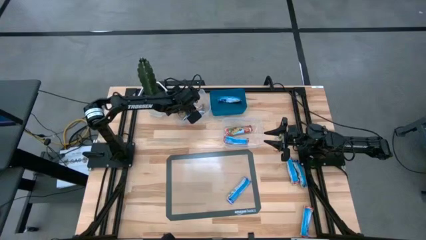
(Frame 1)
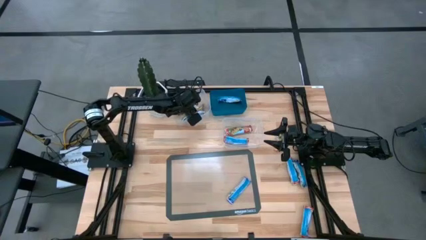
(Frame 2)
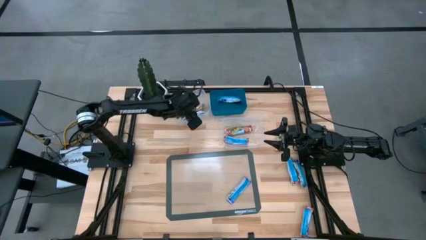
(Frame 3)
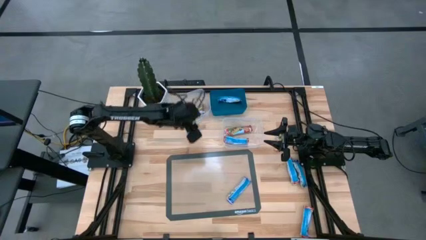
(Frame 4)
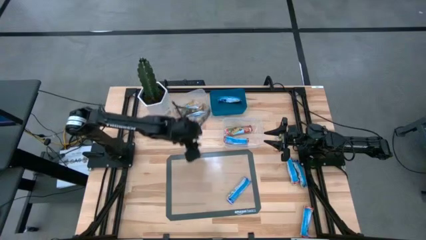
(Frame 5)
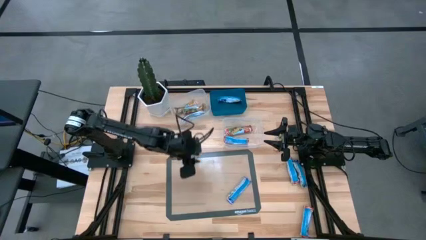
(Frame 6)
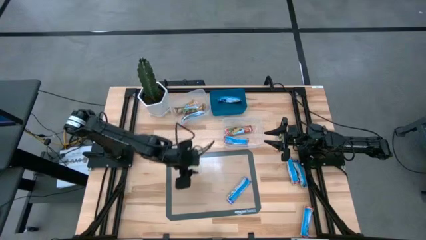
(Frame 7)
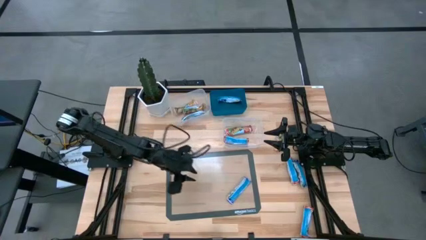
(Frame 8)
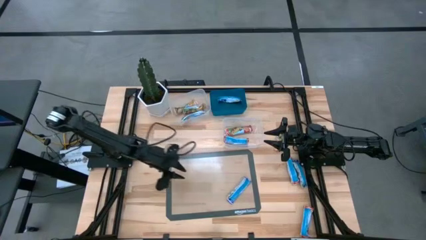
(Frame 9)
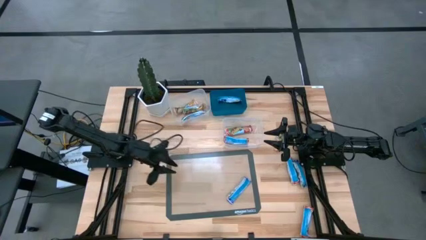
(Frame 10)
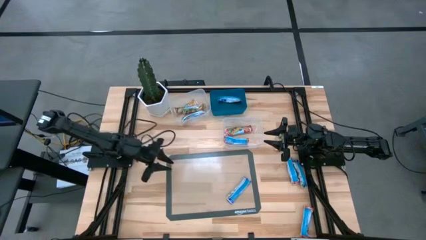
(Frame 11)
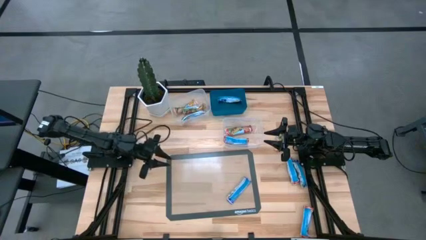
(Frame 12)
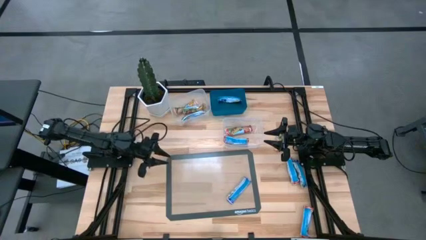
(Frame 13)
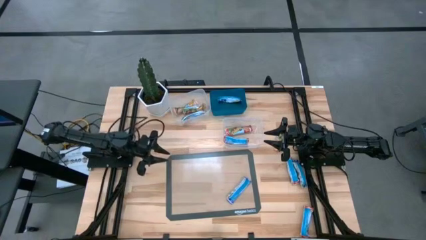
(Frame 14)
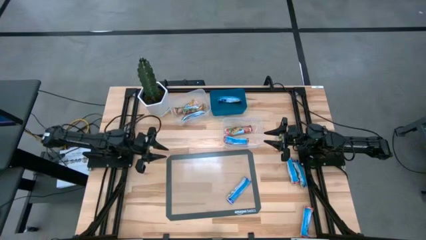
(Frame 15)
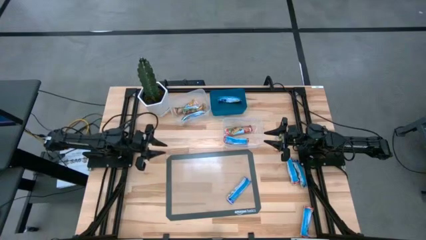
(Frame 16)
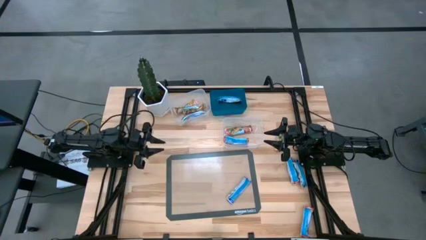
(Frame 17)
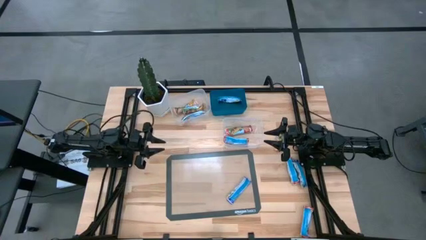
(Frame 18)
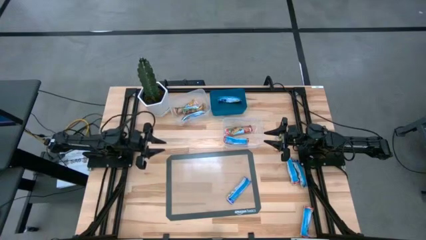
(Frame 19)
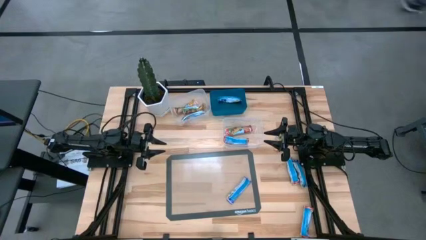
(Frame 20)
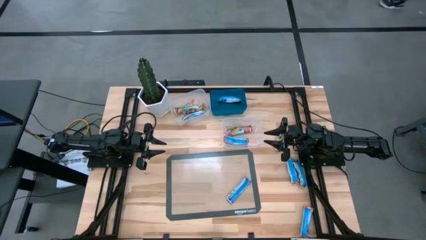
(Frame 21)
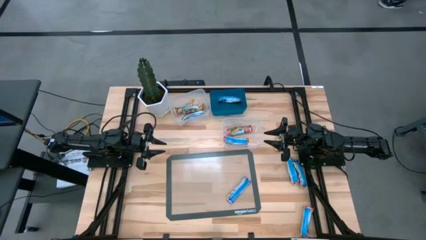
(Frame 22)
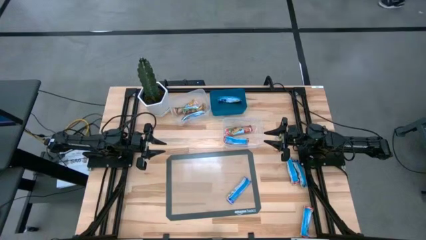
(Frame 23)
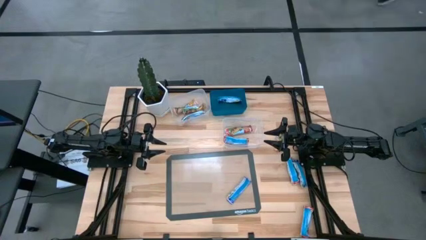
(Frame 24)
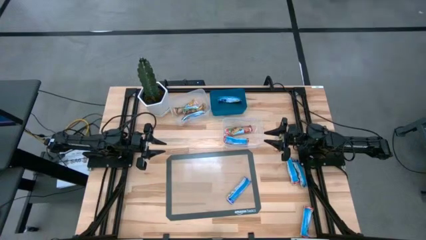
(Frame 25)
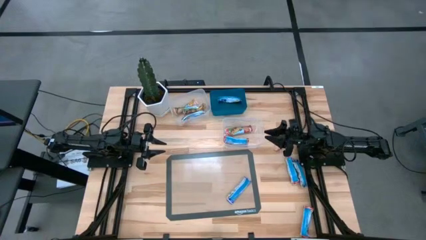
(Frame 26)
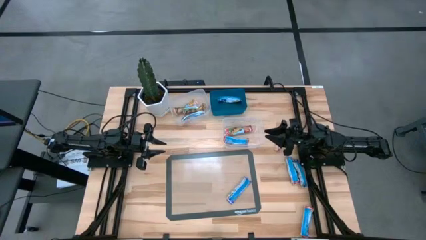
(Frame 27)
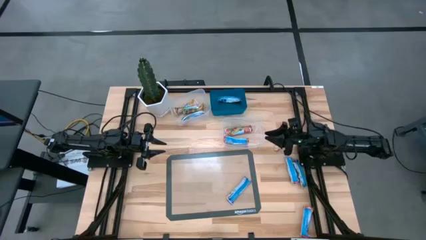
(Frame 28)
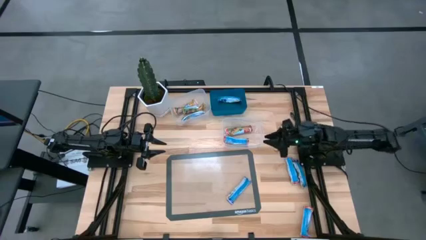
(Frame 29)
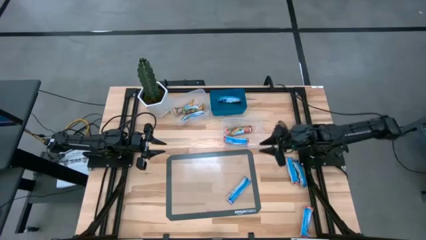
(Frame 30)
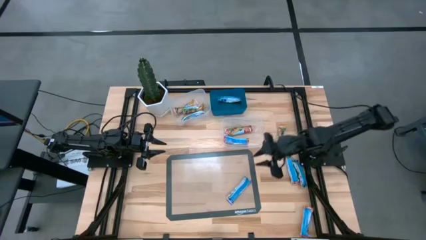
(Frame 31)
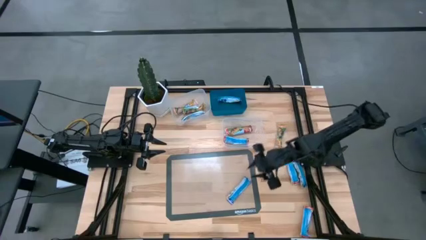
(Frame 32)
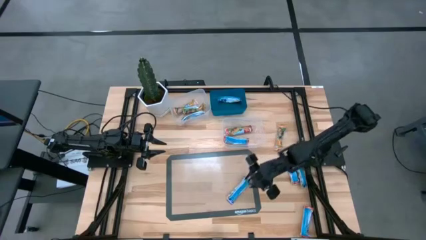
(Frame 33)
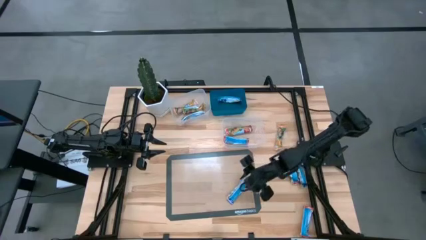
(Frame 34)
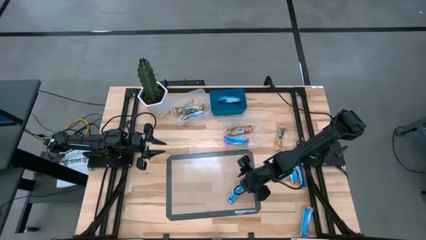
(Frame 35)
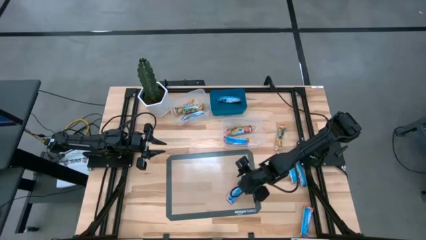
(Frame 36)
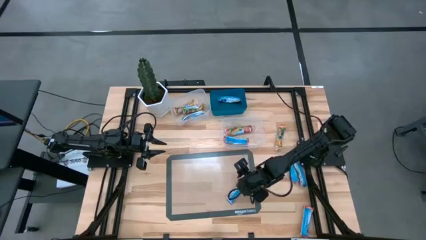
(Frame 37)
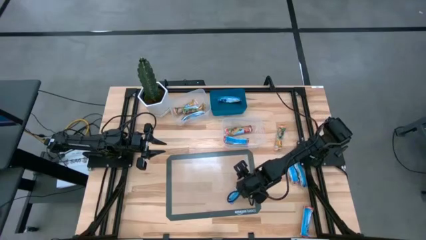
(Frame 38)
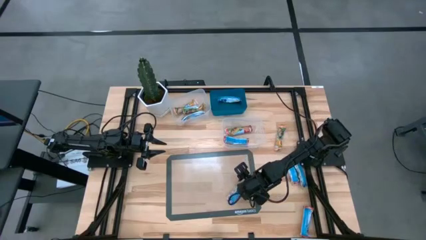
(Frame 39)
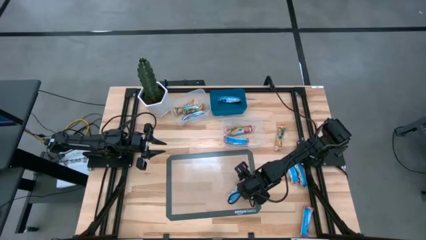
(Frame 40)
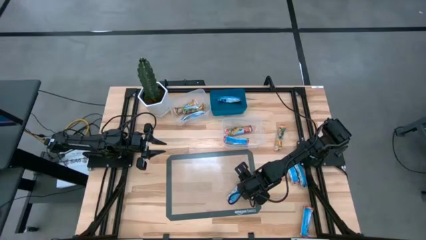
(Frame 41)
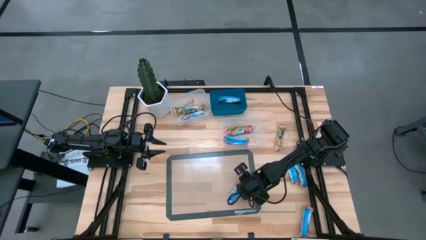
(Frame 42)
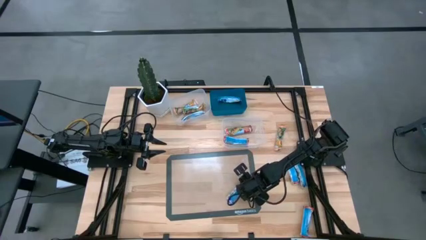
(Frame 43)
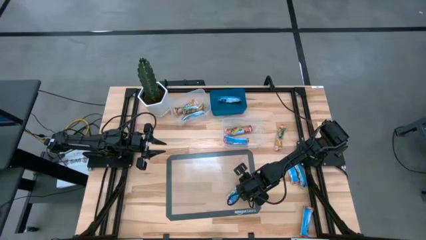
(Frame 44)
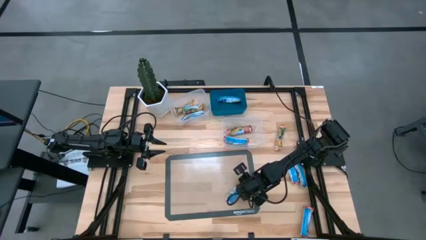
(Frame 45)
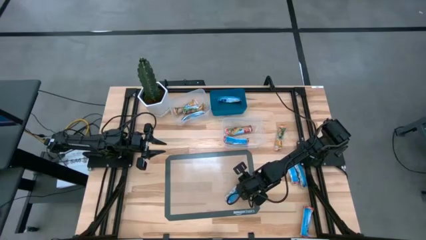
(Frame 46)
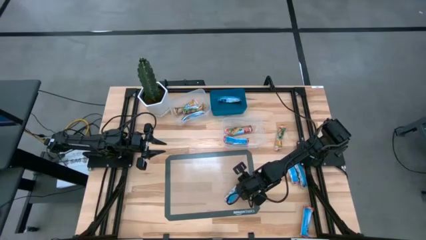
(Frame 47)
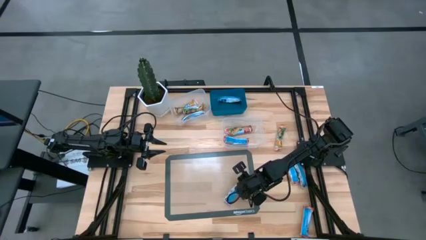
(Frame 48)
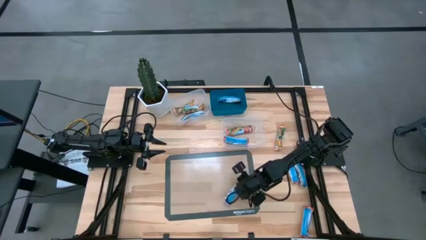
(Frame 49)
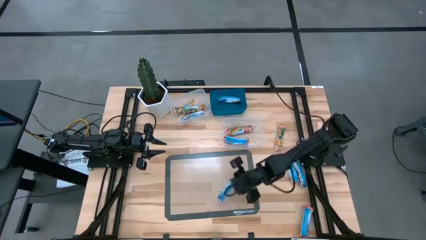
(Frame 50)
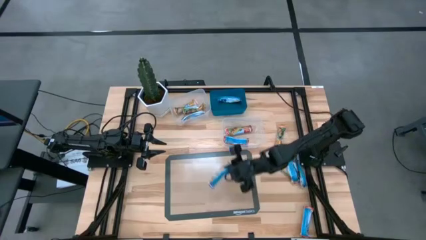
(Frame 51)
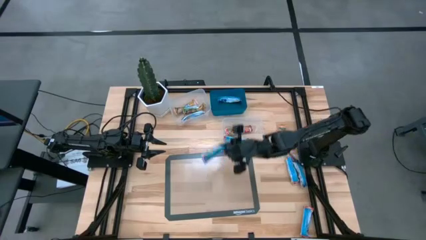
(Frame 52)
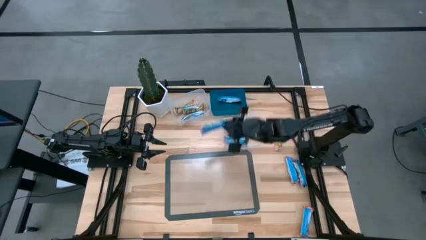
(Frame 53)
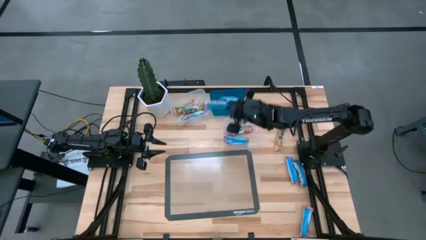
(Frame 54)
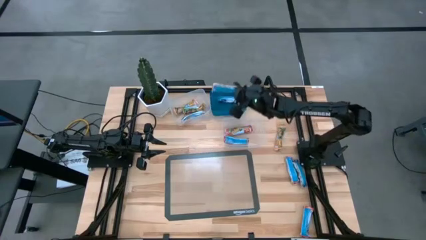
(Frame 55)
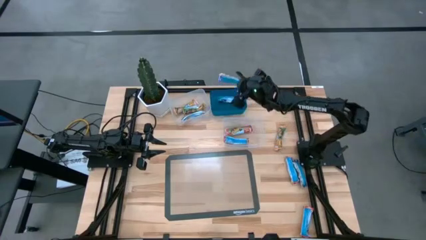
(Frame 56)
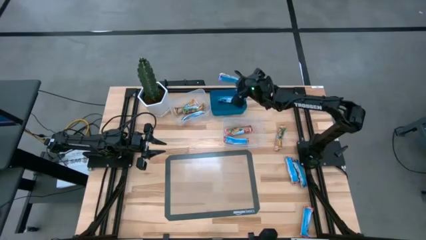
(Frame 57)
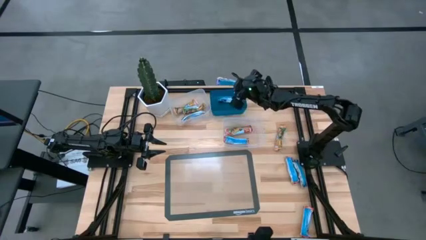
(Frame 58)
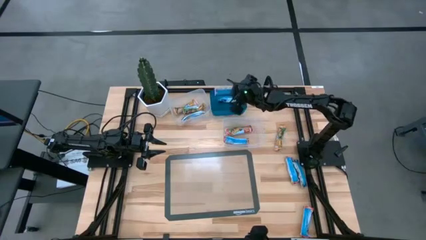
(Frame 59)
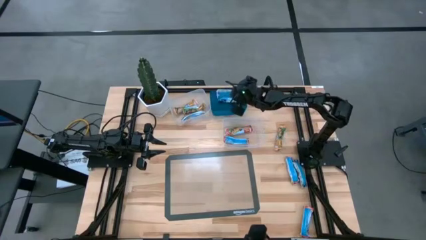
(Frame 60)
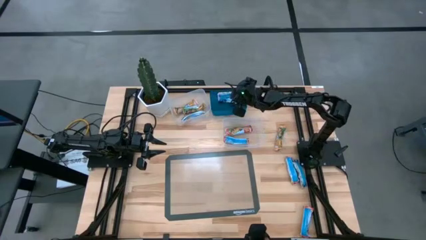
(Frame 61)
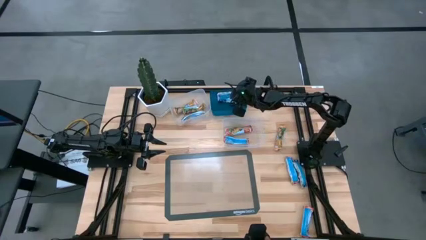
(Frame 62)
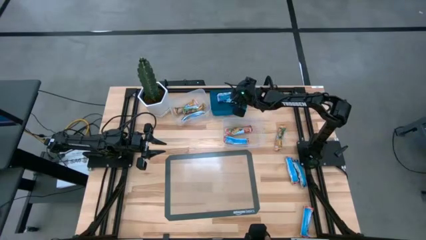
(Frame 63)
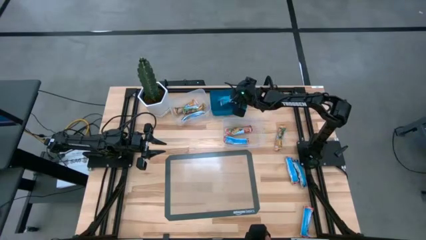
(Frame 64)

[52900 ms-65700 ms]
Task: Pick and place Granola Bars by type
Put the blue granola bar into the blue bin
